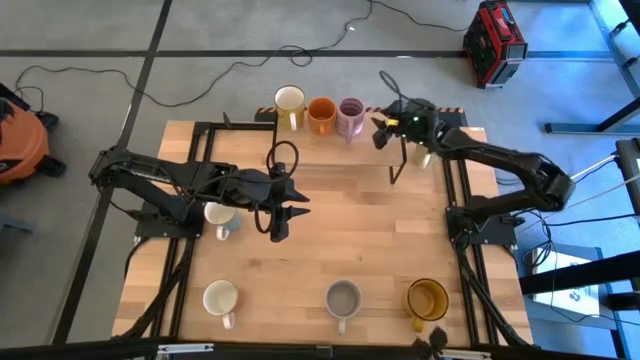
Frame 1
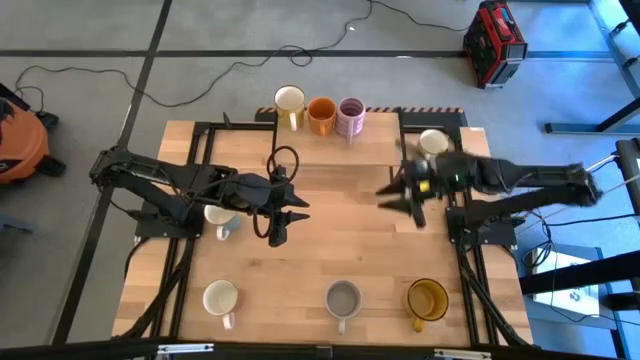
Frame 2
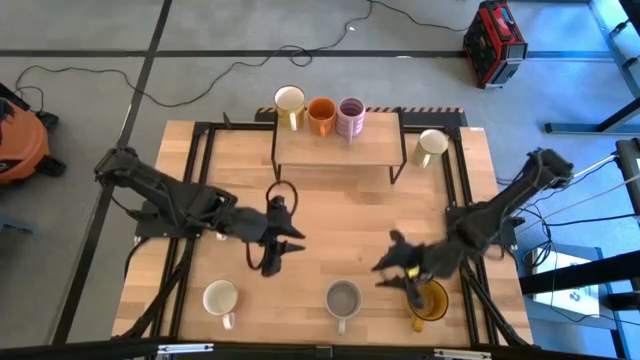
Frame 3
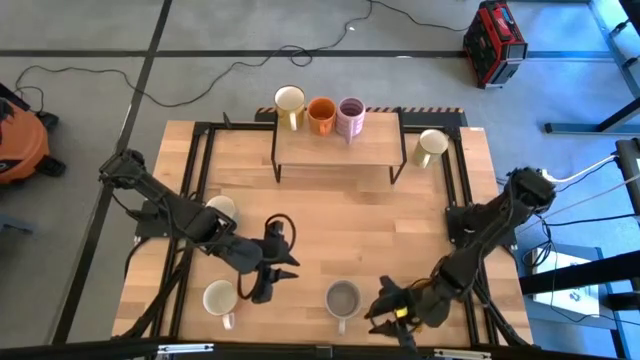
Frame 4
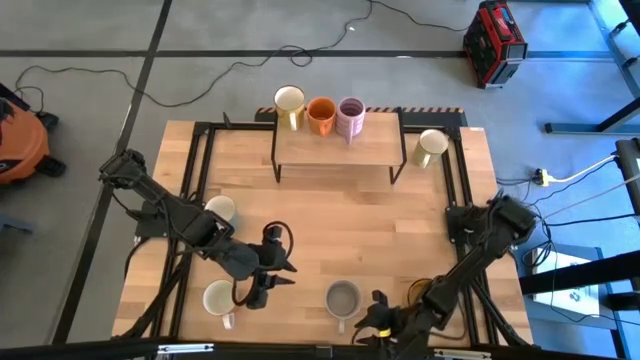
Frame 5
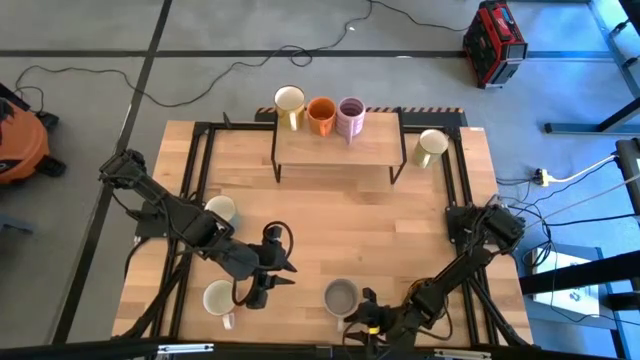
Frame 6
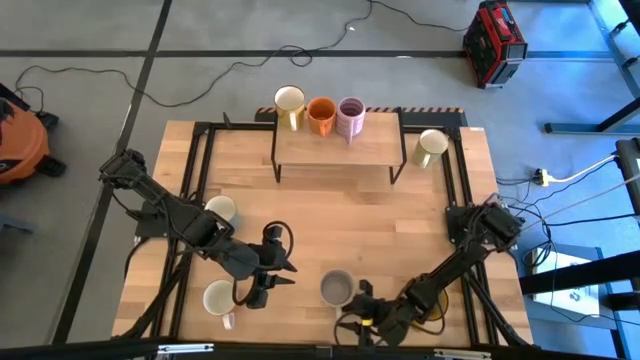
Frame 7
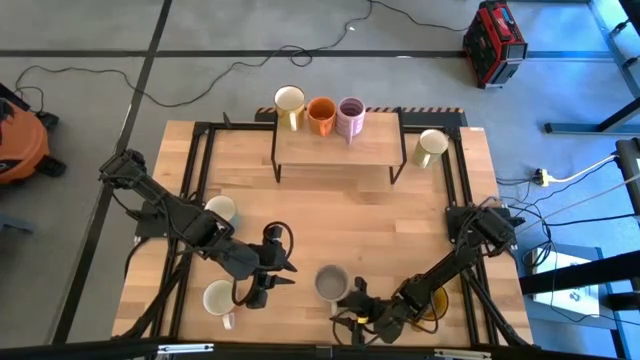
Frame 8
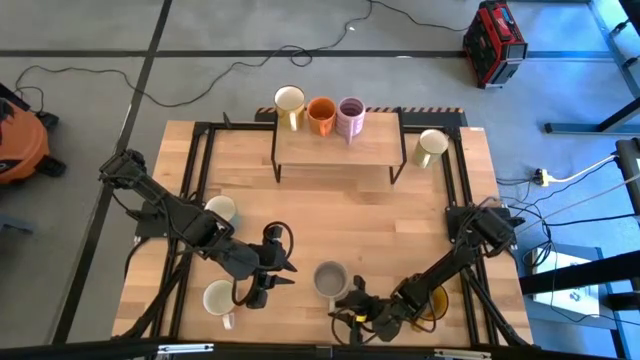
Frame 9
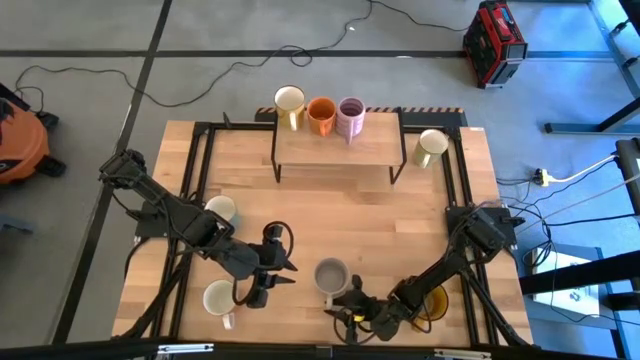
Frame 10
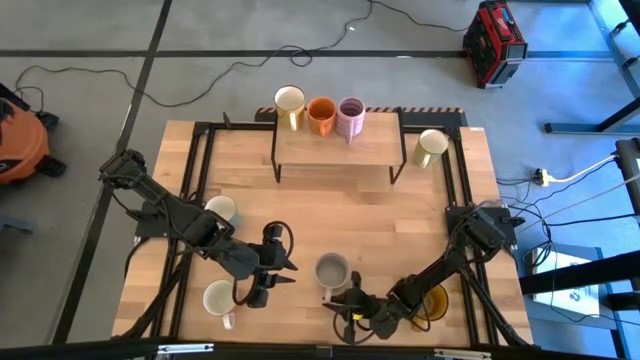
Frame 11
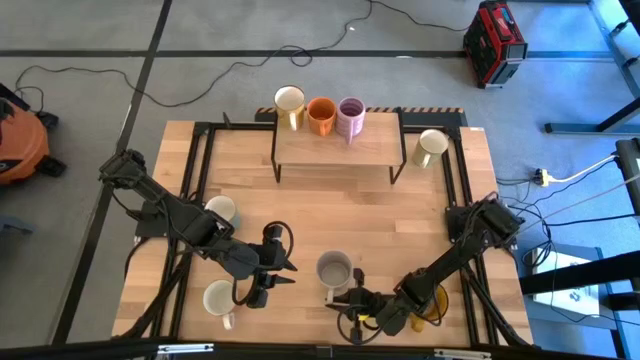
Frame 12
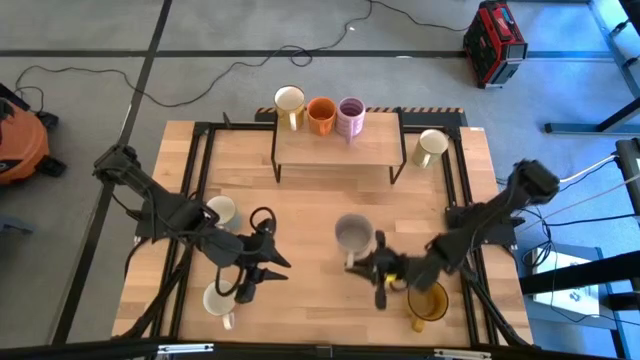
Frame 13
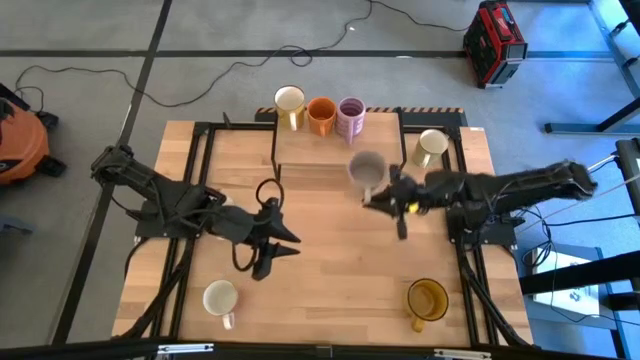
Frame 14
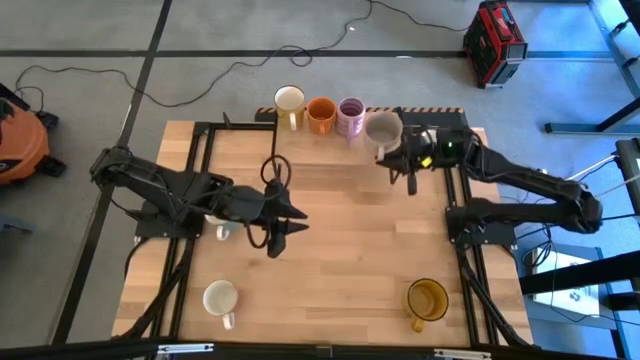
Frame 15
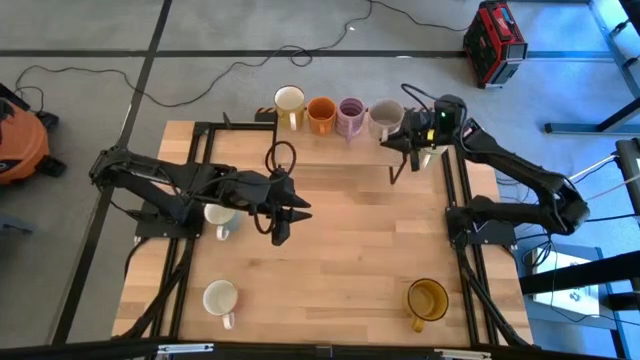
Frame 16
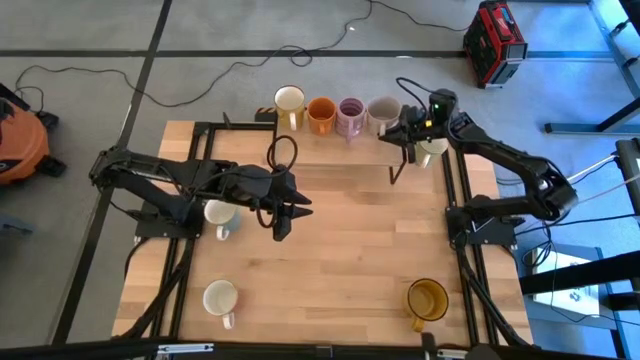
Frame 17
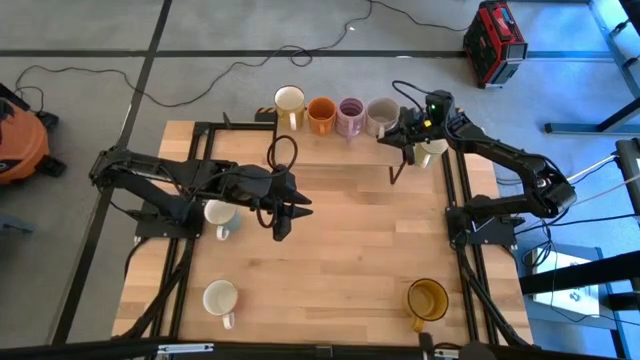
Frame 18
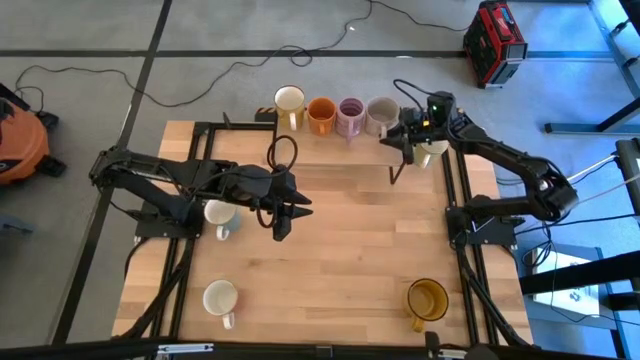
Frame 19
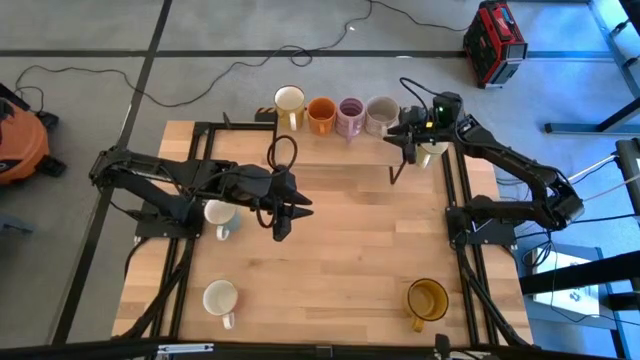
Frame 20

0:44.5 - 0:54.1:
Task: Place coffee mugs
Put the gray mug on the shelf

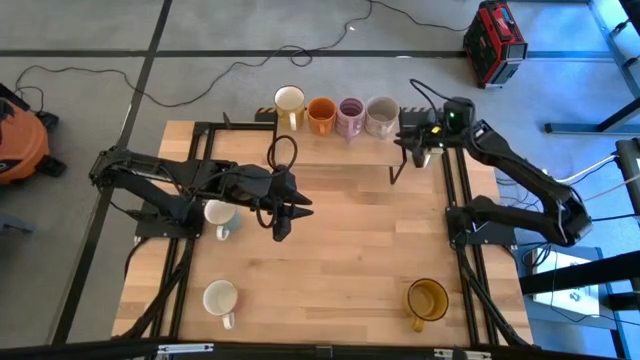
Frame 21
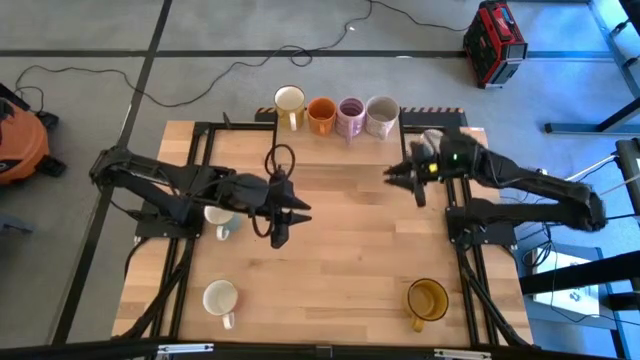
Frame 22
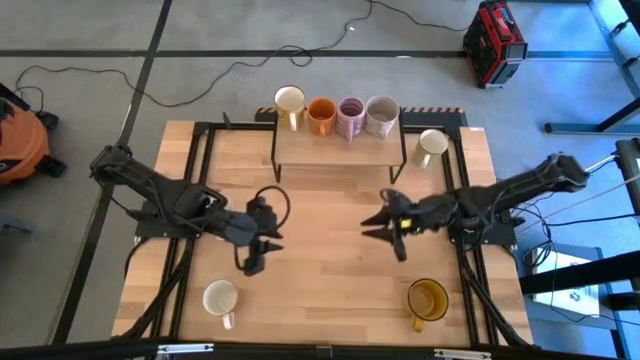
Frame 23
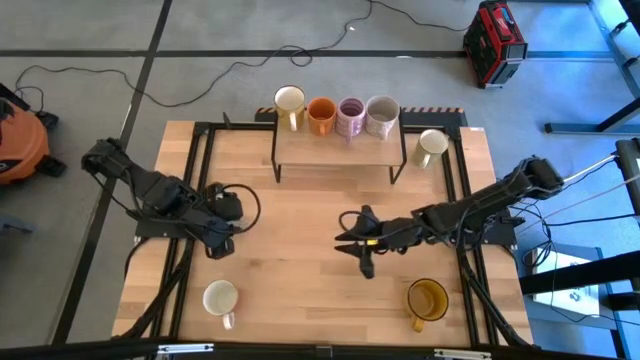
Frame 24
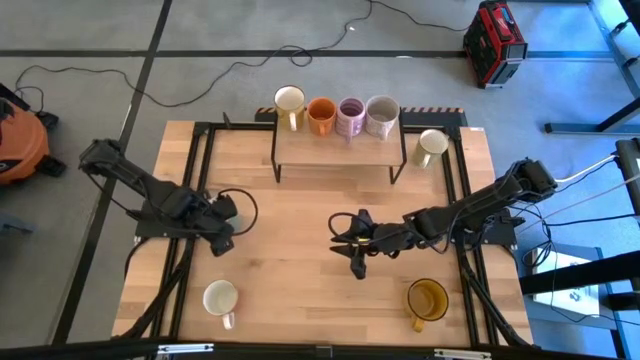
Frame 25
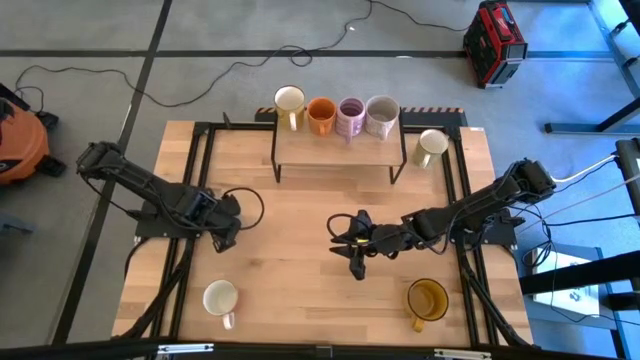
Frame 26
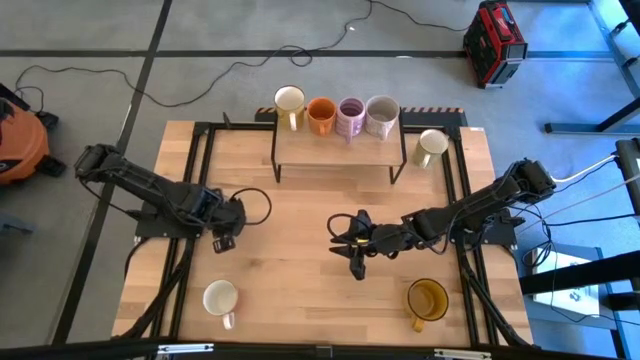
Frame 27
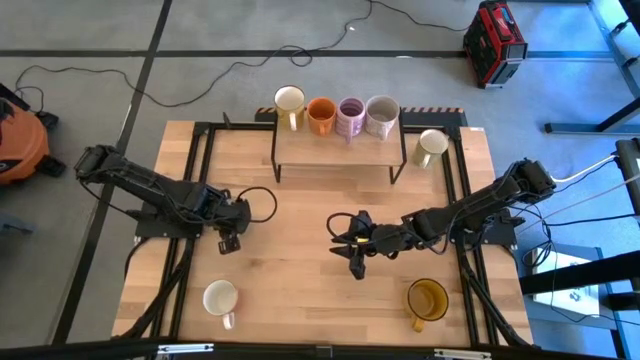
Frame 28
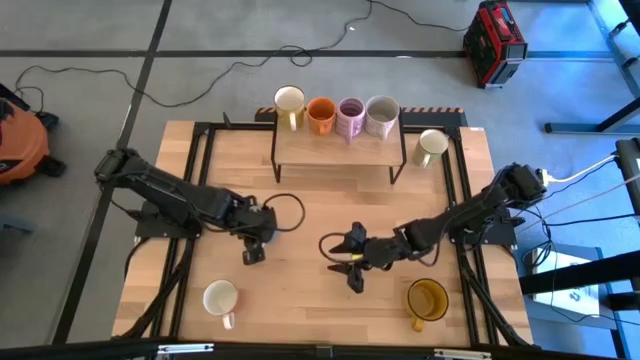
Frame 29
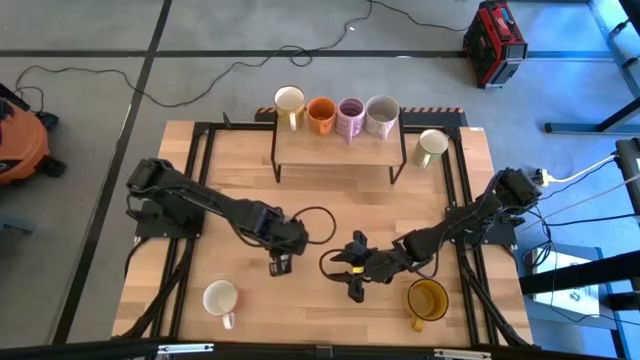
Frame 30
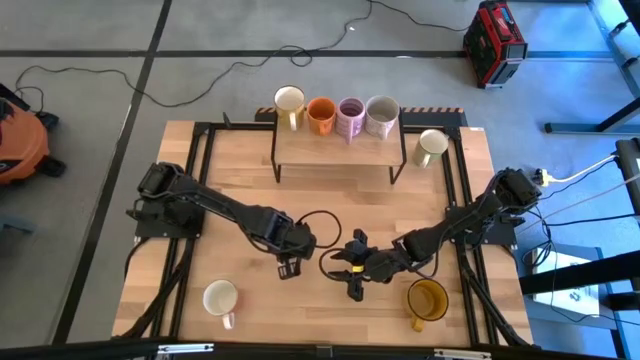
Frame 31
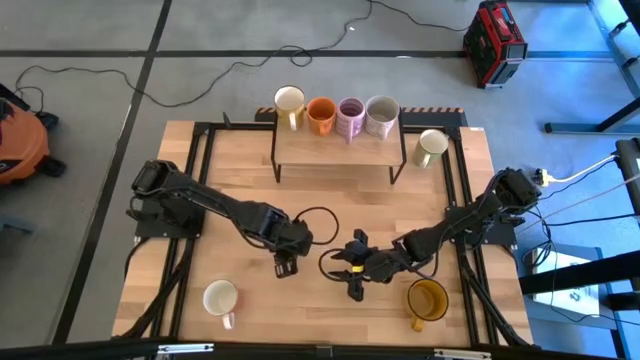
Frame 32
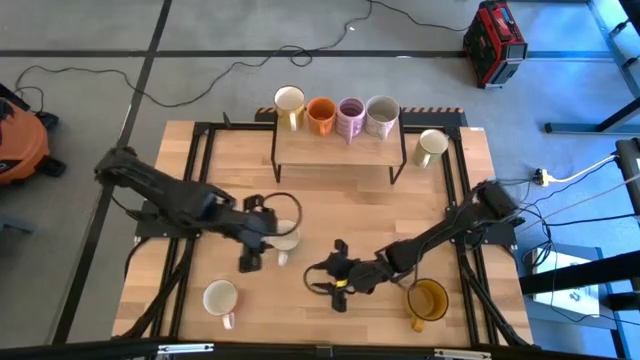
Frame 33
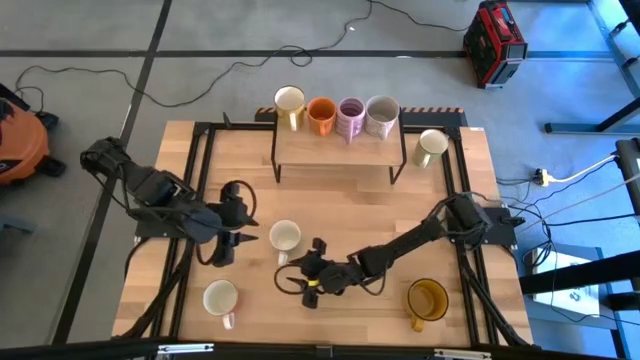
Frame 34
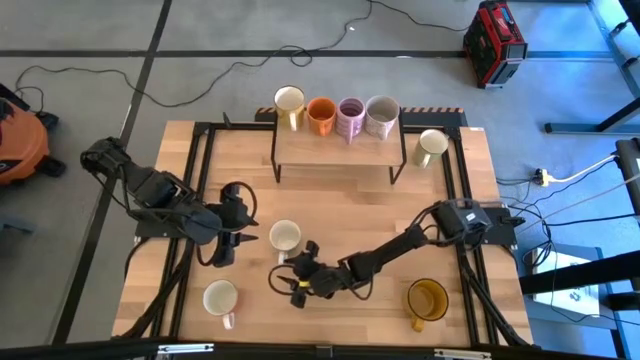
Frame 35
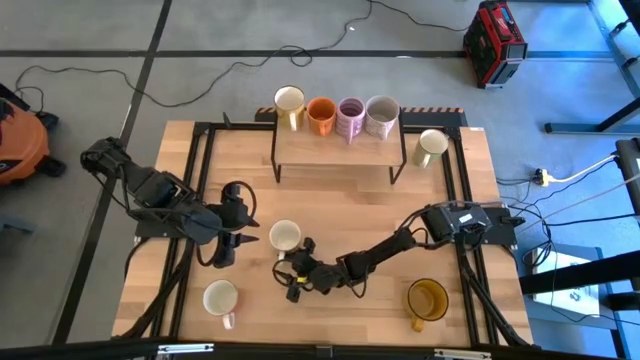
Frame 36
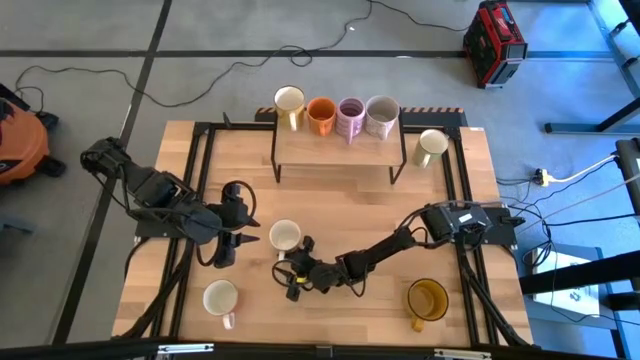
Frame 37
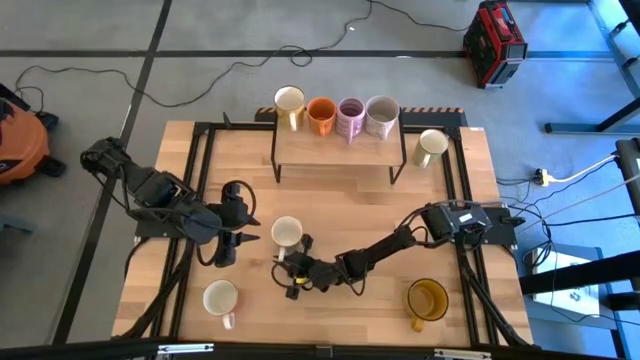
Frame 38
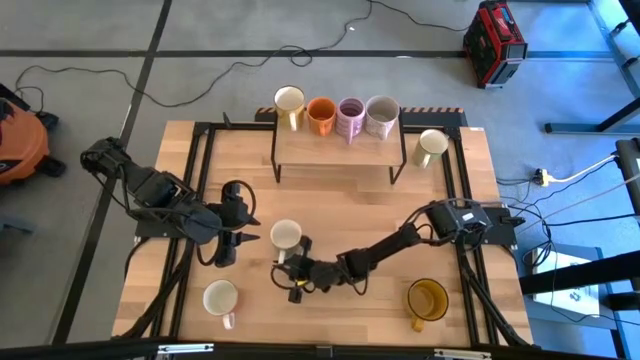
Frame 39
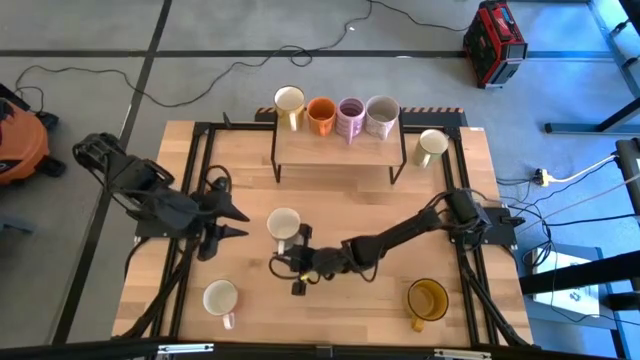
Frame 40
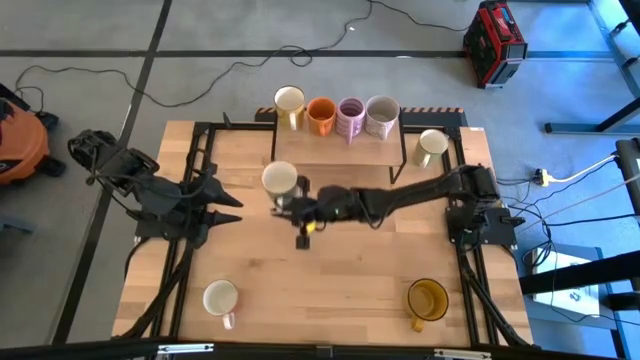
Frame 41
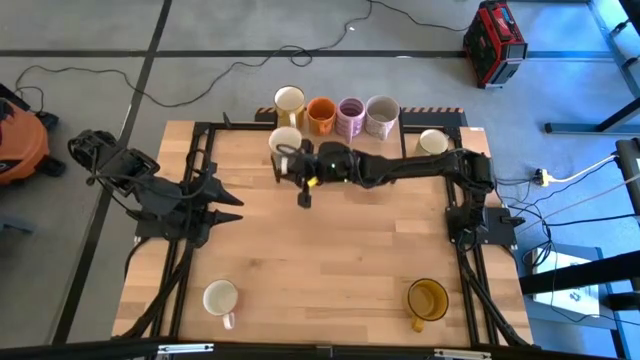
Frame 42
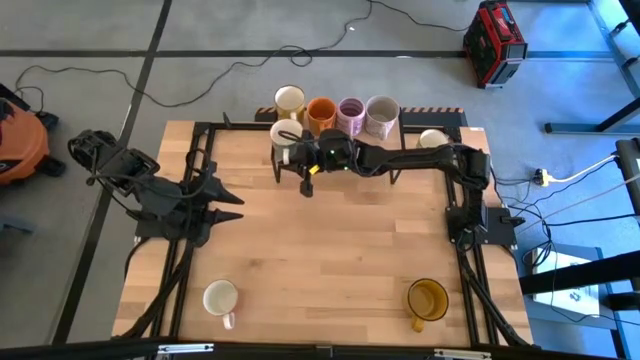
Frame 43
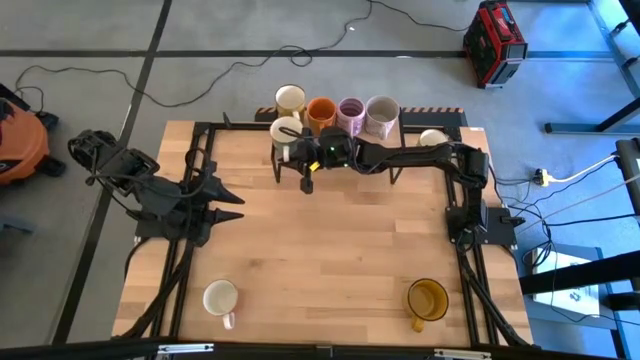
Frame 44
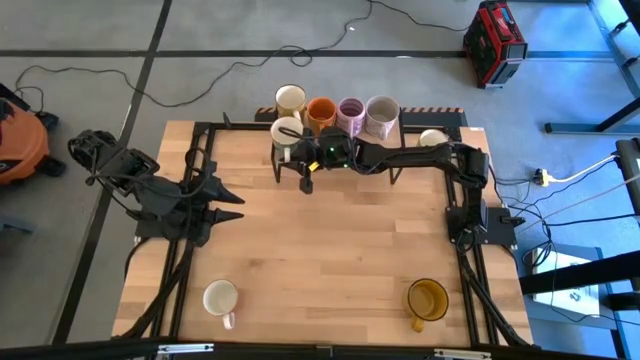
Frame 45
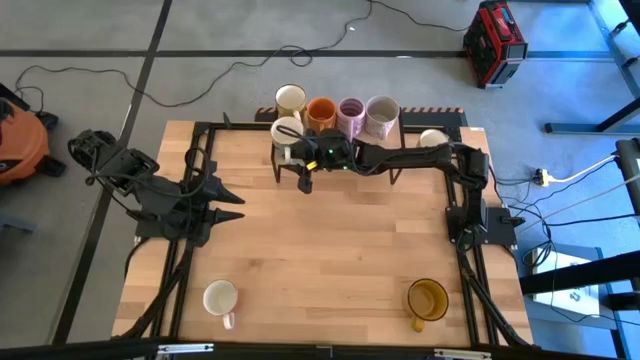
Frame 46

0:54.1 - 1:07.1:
Put the white and green mug on the shelf
